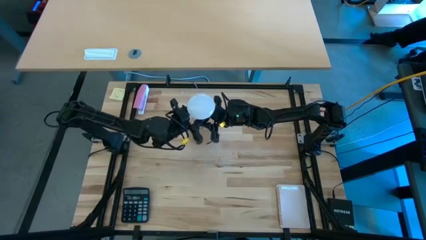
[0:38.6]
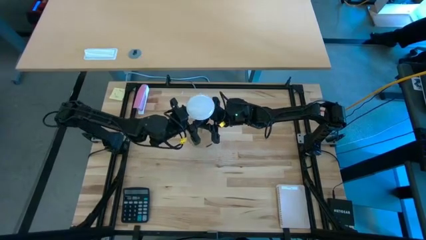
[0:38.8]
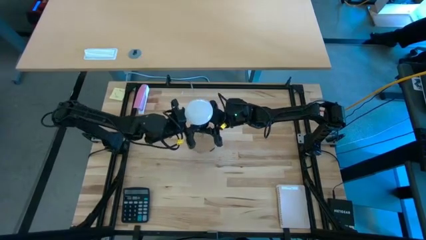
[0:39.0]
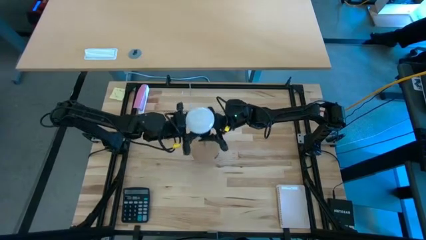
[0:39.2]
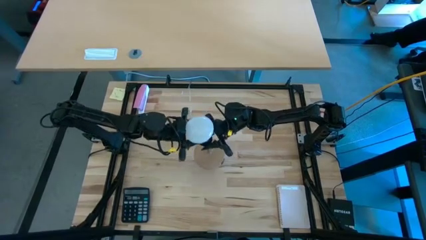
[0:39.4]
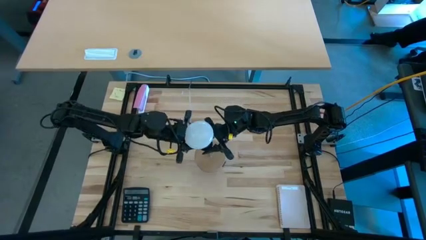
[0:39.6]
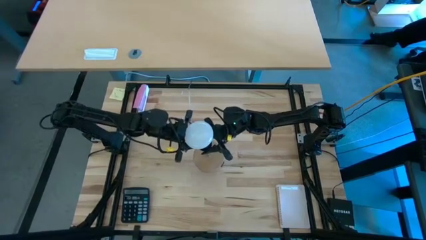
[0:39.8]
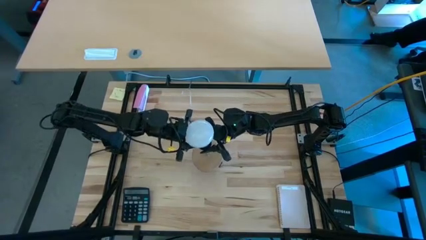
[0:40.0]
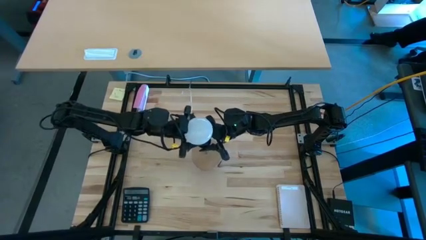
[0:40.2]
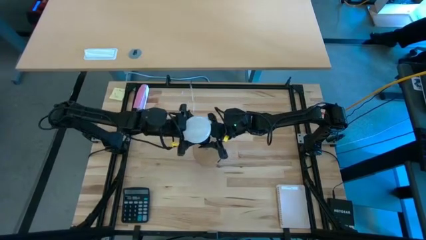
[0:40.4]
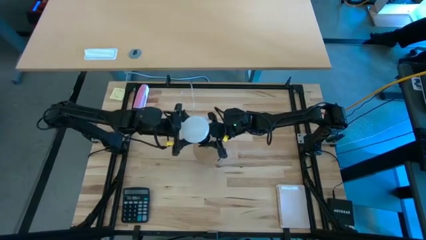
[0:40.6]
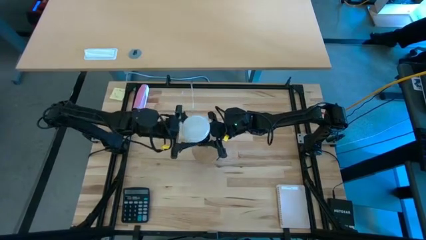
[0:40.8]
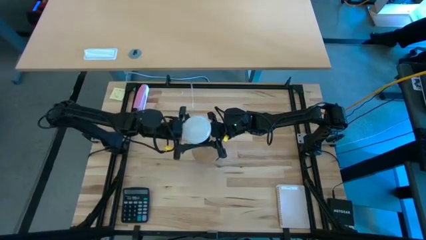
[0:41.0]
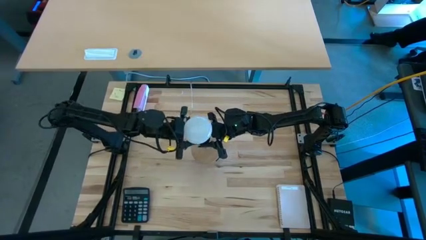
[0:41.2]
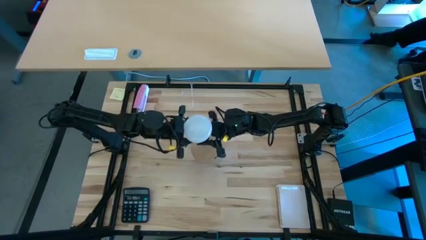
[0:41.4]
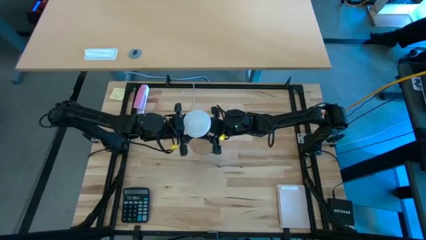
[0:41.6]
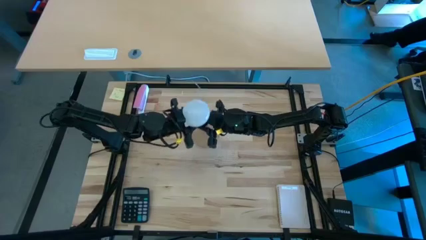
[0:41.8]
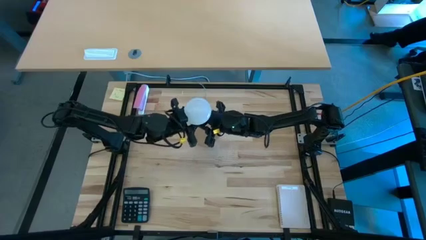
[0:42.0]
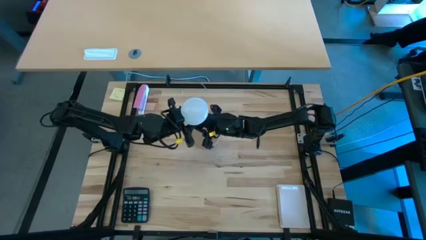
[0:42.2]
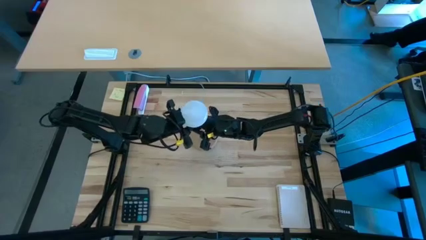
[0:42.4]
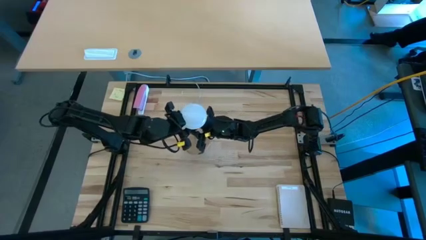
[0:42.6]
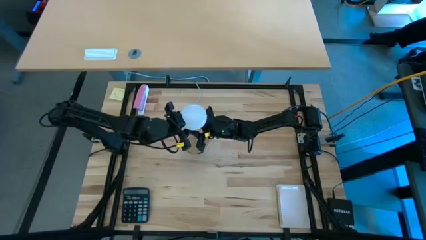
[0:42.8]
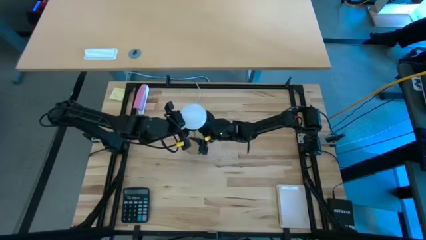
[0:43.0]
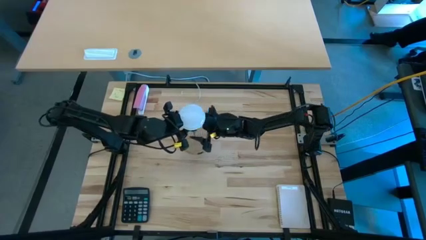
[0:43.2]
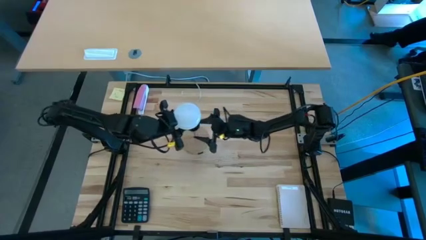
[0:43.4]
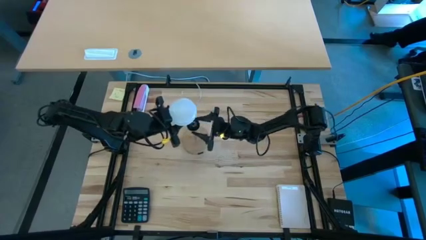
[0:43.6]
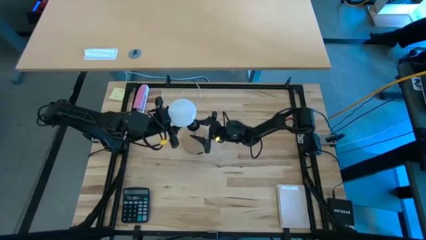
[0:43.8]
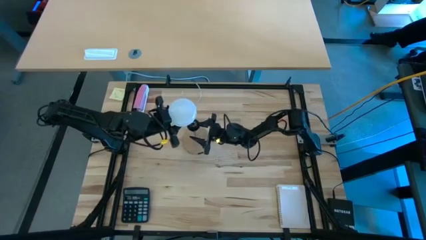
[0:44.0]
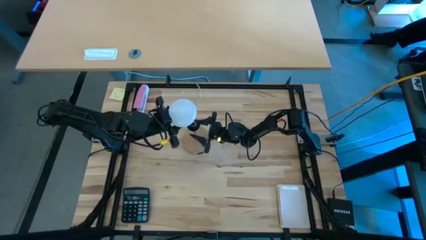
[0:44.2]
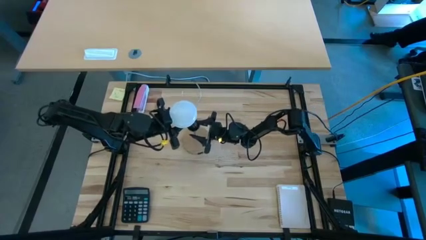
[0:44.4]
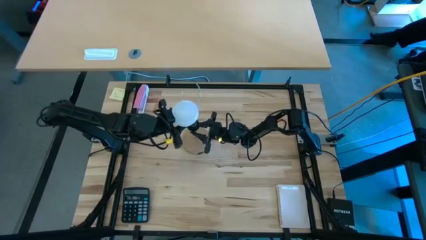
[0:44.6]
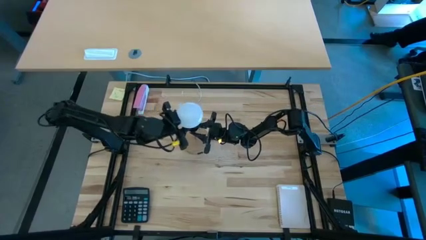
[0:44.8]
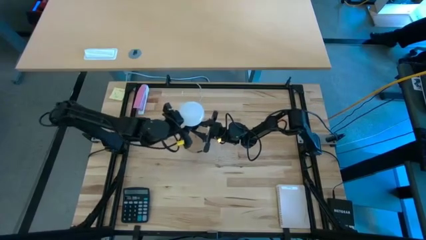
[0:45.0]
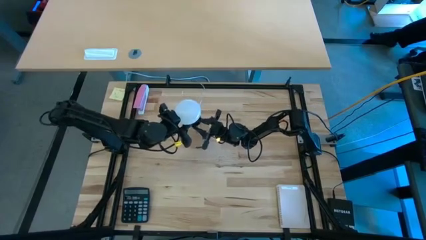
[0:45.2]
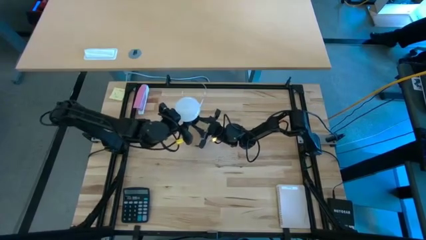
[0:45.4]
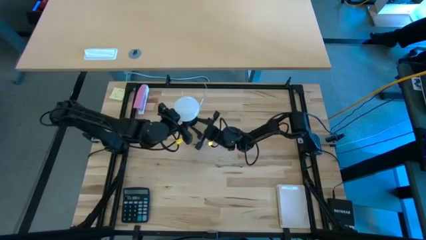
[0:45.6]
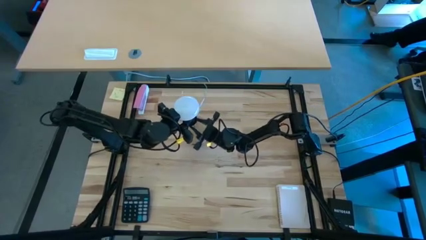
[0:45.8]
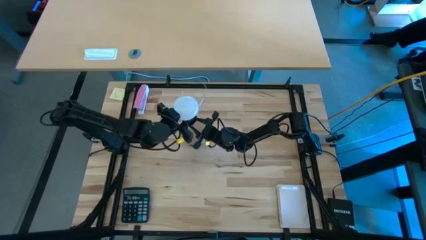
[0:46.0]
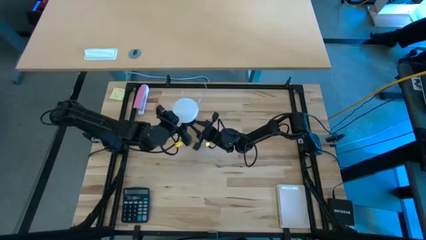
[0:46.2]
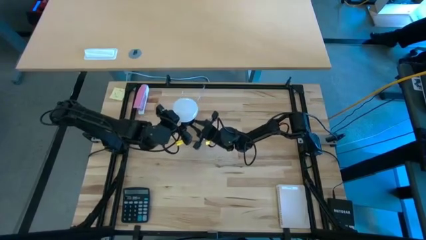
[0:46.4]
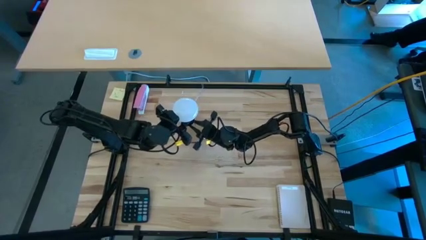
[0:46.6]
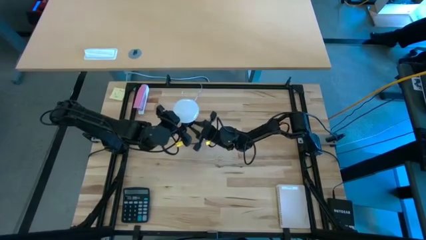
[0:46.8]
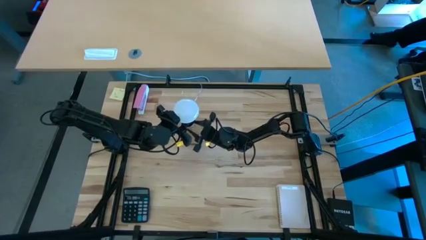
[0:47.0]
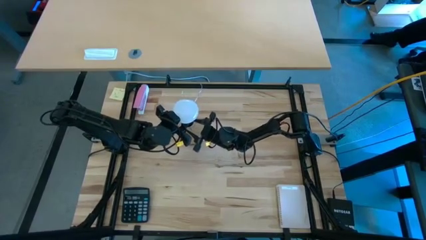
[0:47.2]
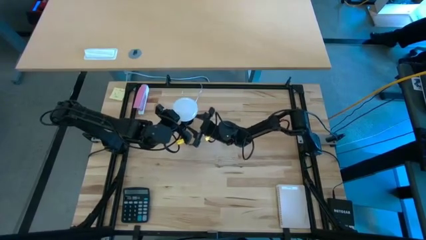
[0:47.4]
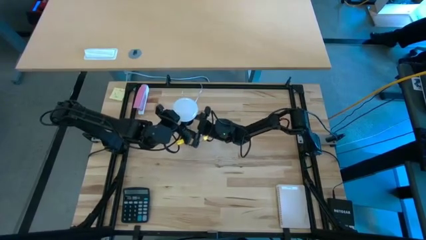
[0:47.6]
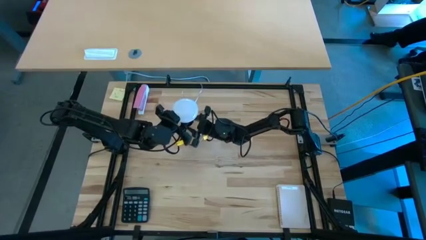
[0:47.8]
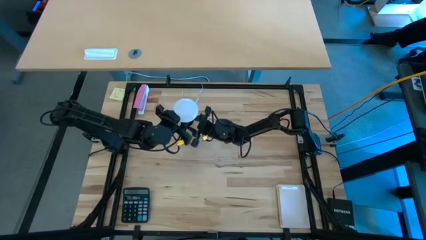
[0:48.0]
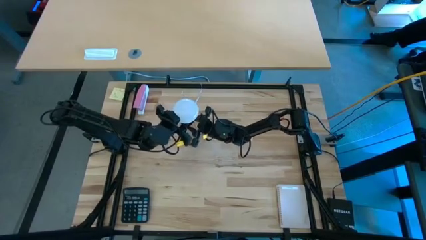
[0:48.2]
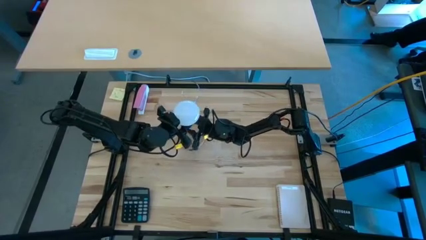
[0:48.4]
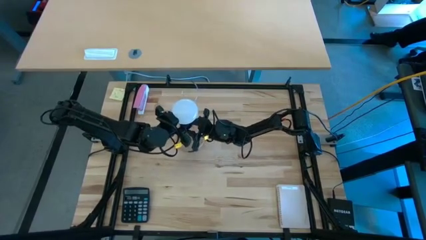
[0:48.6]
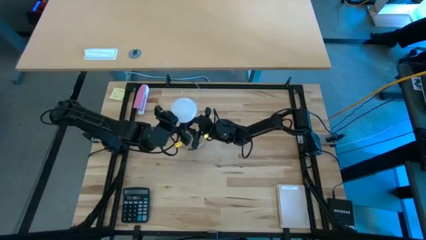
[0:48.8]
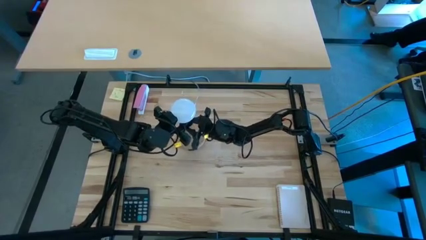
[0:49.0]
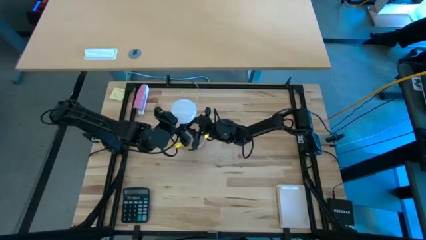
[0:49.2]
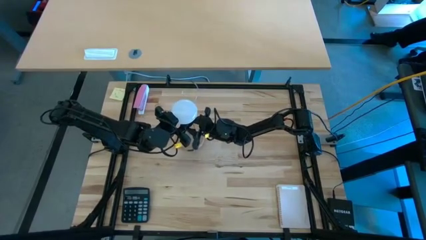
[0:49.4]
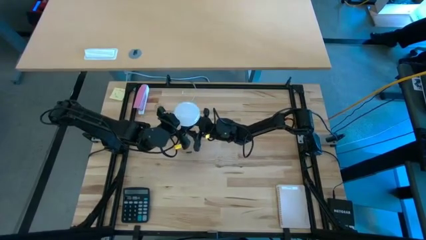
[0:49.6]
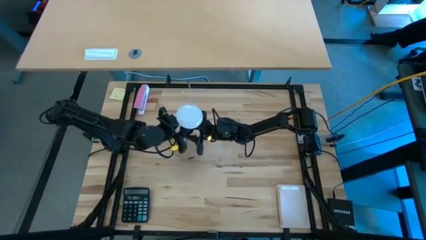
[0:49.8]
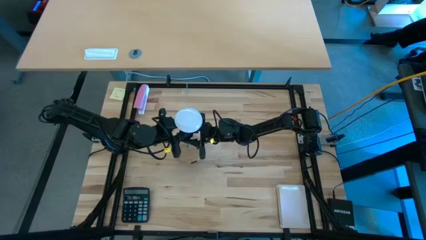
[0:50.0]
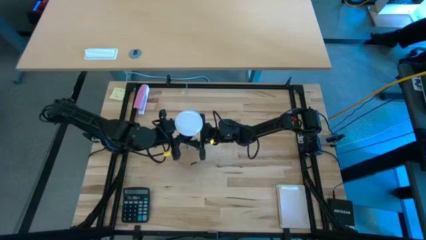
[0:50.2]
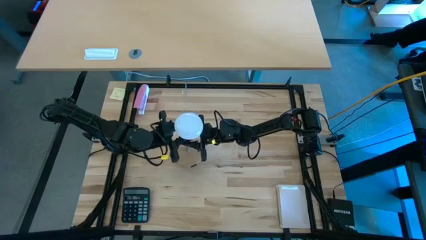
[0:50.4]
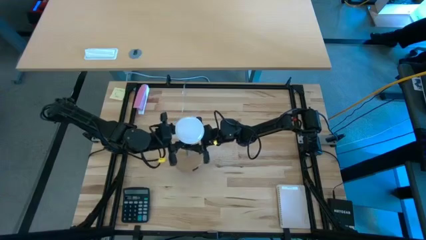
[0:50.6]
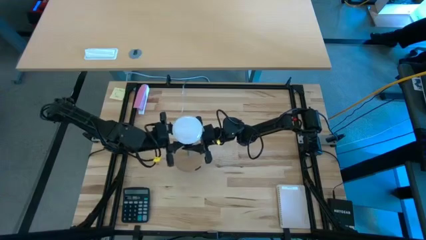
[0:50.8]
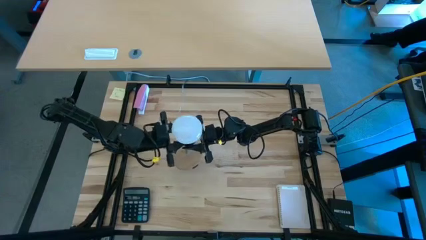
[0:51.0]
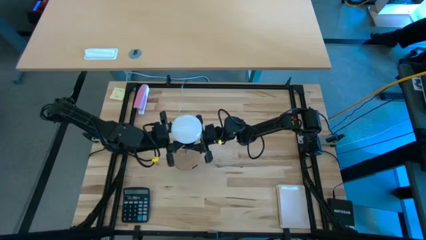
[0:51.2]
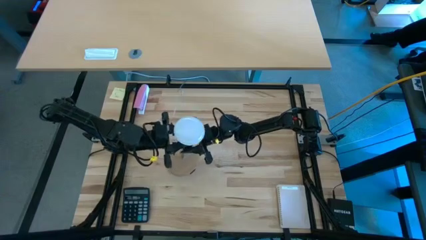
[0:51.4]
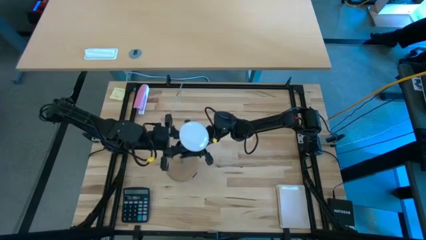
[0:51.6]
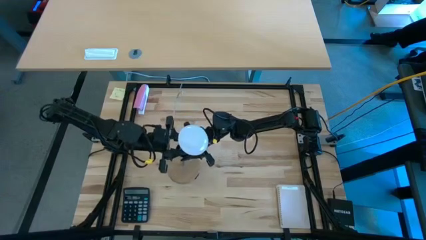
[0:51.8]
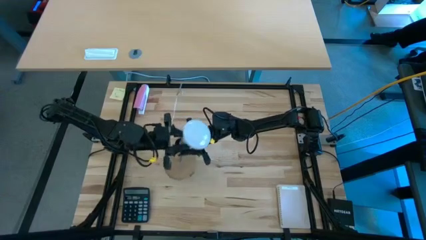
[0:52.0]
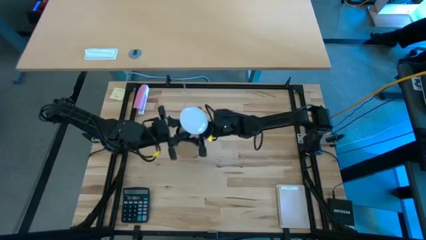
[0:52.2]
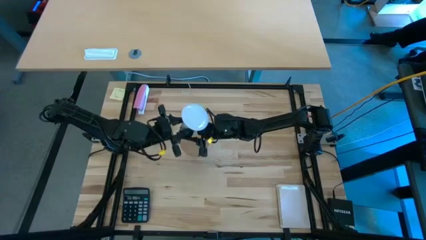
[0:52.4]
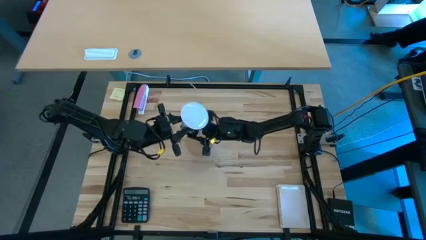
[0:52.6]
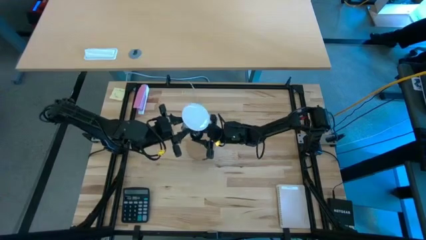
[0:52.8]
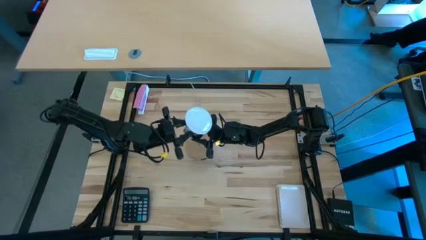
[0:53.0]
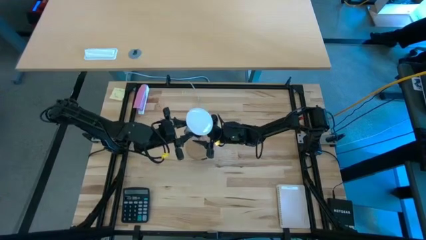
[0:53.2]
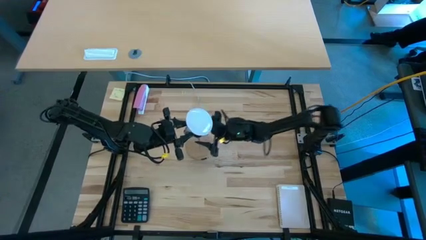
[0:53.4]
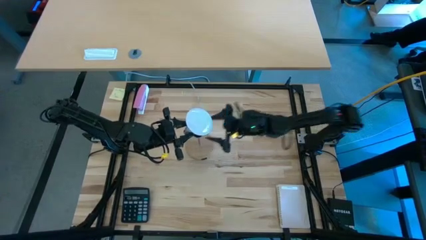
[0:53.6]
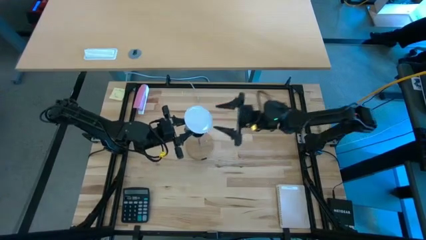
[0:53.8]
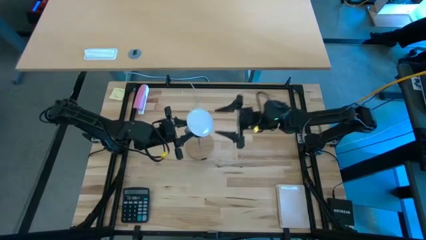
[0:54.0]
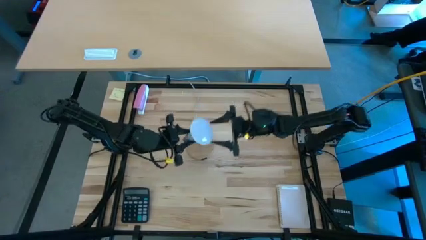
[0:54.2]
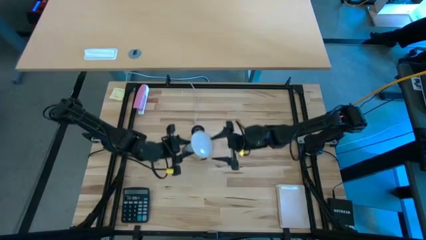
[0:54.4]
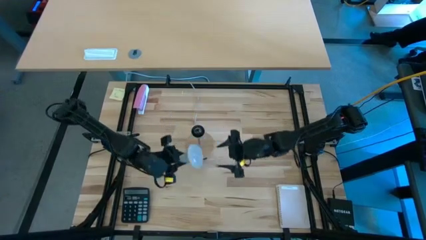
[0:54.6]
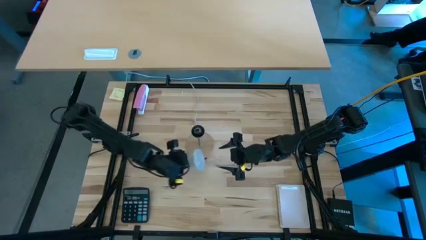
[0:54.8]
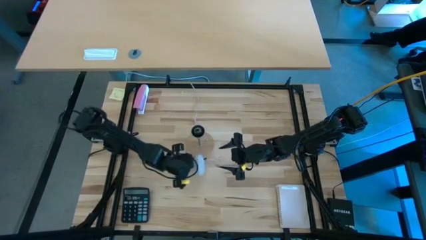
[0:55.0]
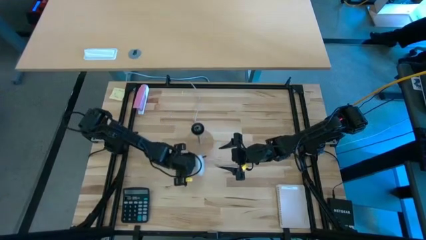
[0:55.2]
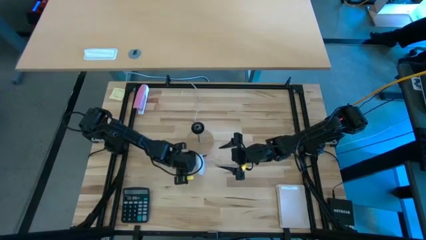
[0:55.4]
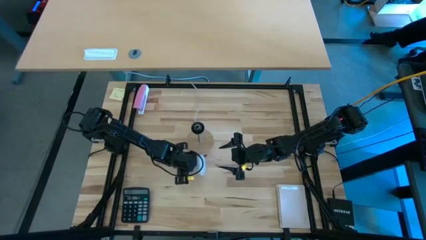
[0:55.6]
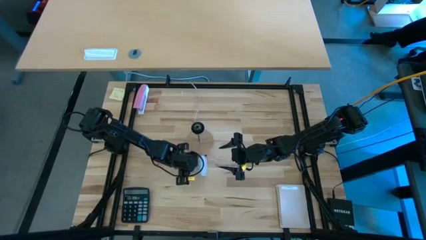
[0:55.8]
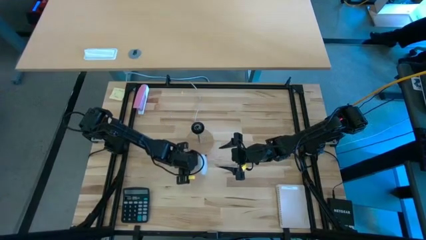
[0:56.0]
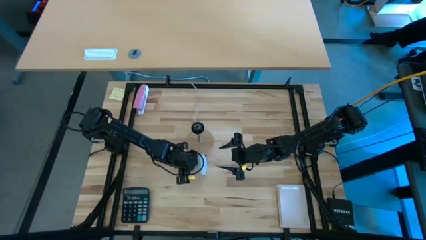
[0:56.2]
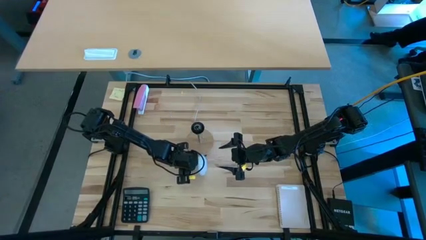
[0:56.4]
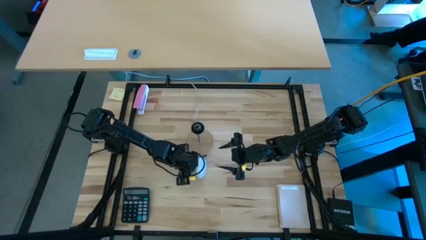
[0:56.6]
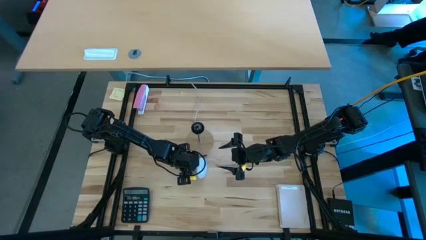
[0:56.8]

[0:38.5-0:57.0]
Task: Screw lightbulb
Insert the lightbulb into the desk lamp
